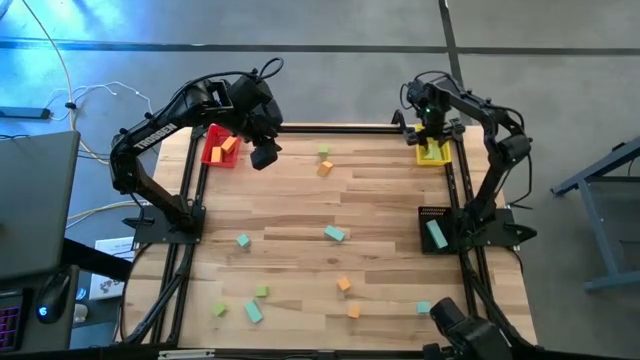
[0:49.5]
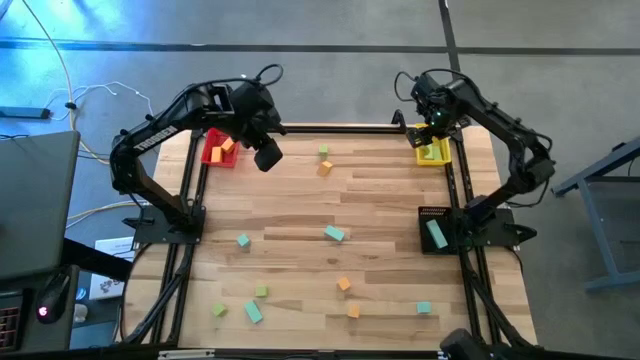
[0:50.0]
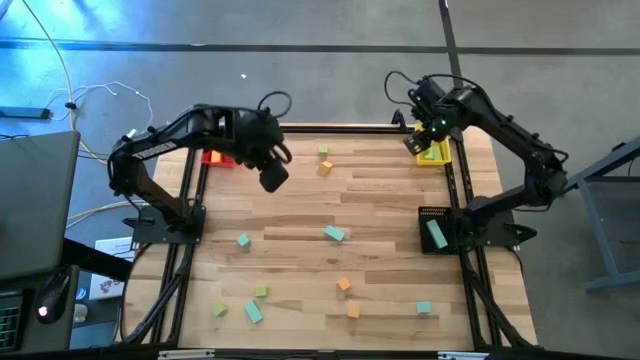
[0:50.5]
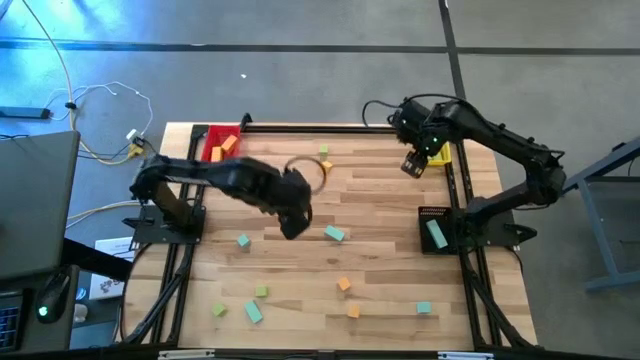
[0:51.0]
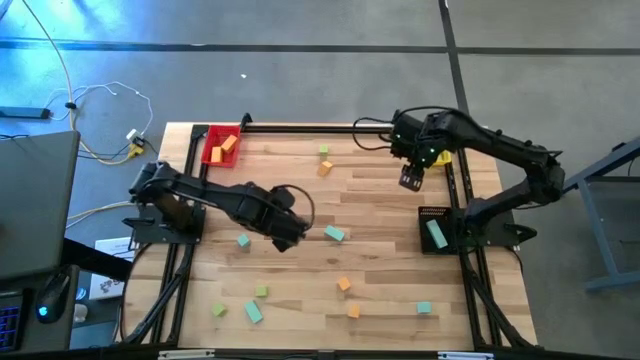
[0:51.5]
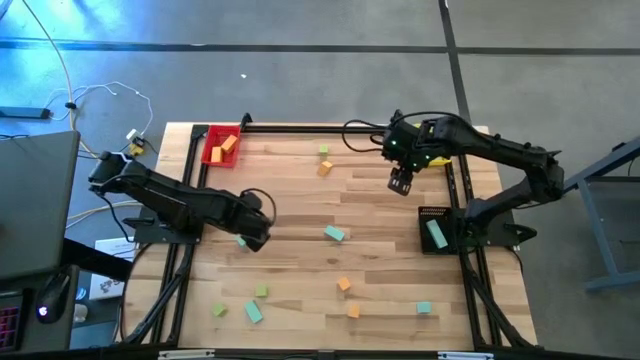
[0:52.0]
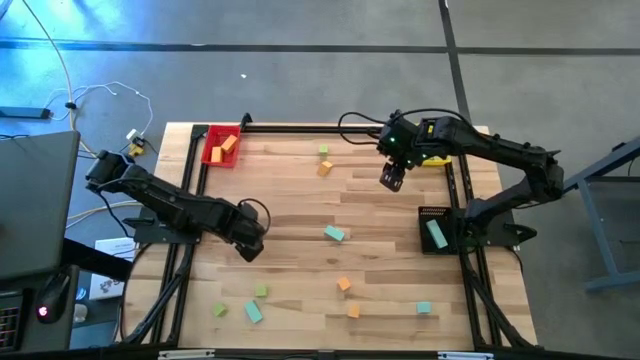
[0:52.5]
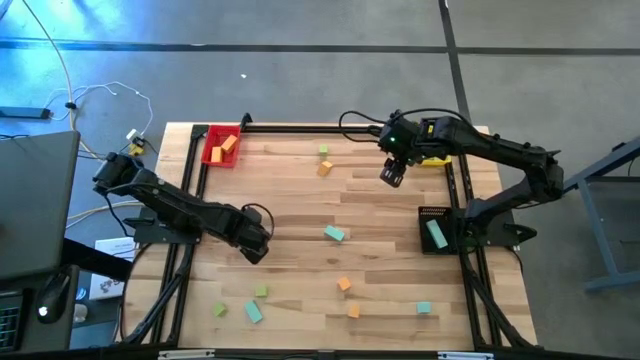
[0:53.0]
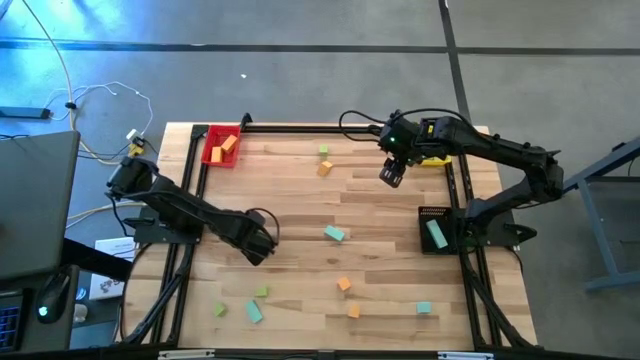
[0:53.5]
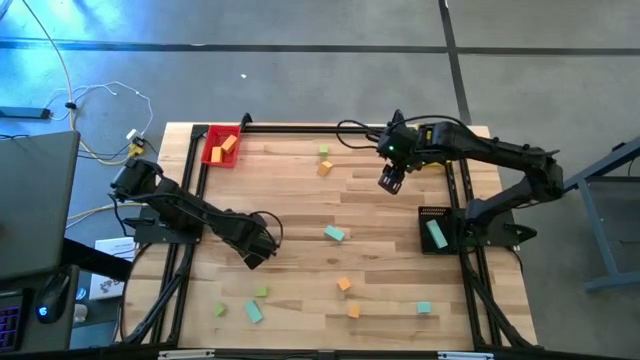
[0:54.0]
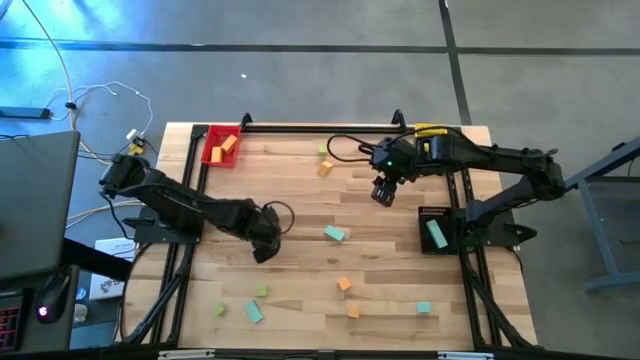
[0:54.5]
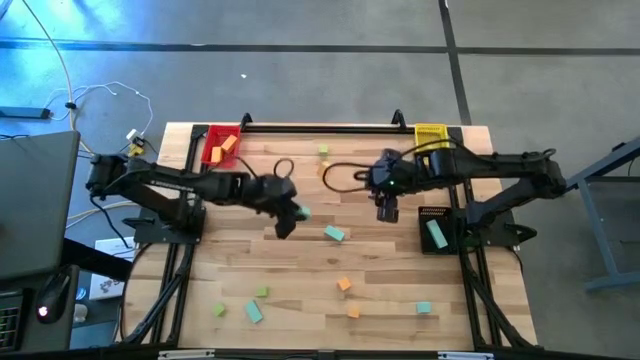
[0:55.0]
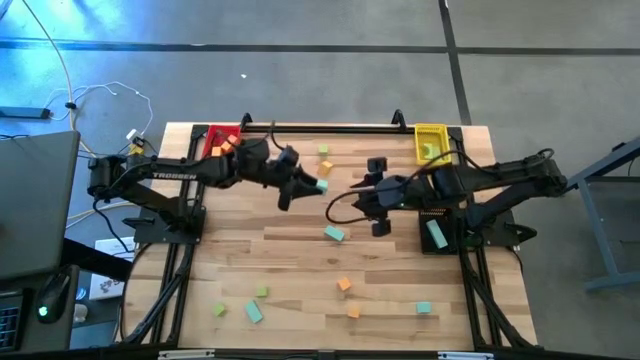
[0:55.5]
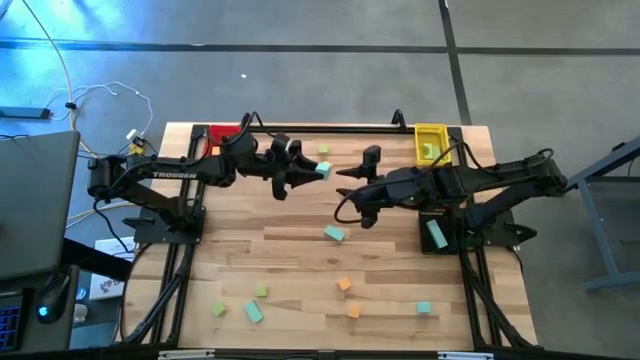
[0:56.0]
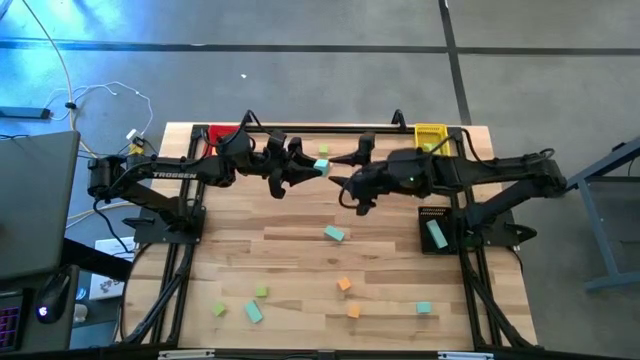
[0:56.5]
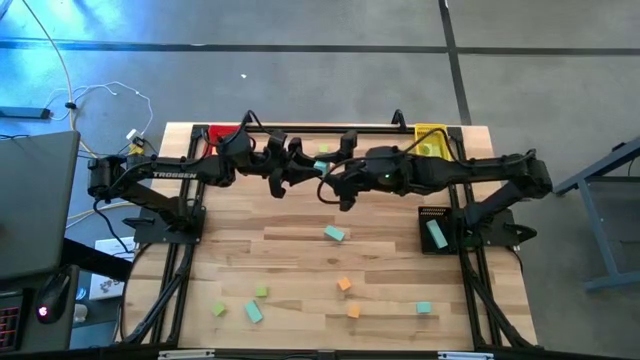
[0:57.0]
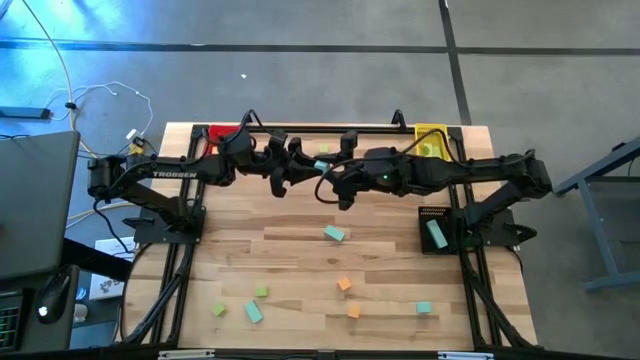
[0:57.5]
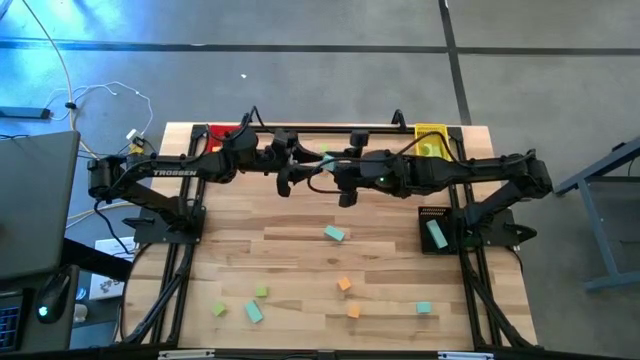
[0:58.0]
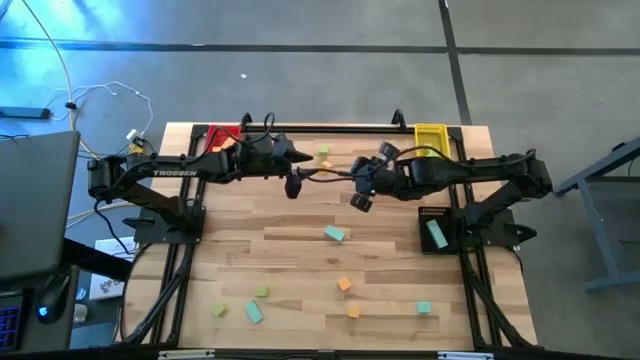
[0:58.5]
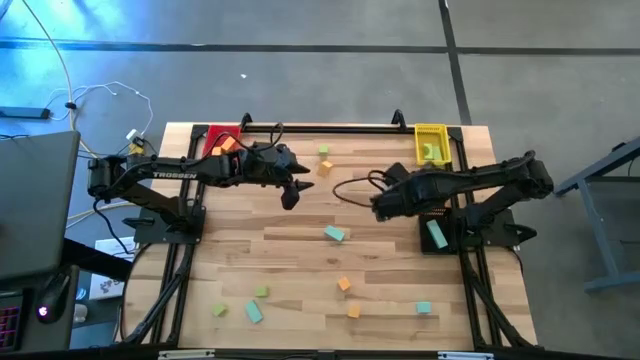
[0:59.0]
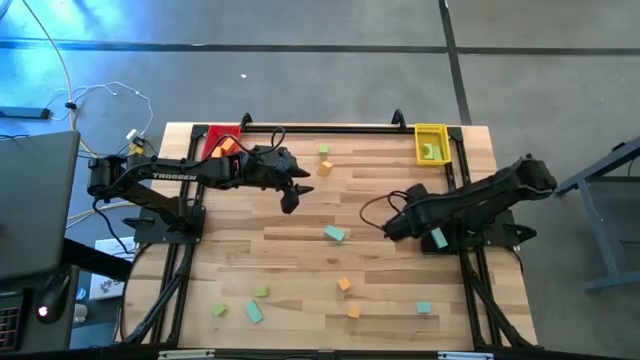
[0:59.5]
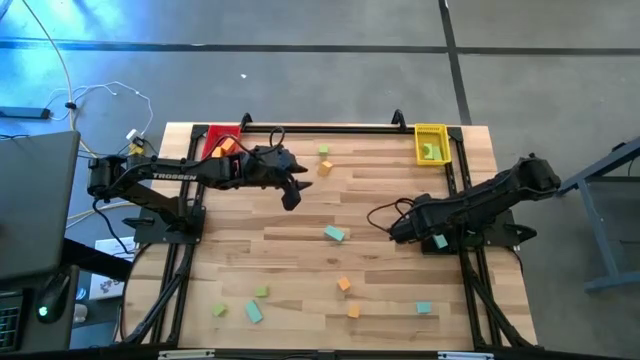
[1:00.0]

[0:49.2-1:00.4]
Task: Sort & place blocks by color
Put the blue block into the black bin

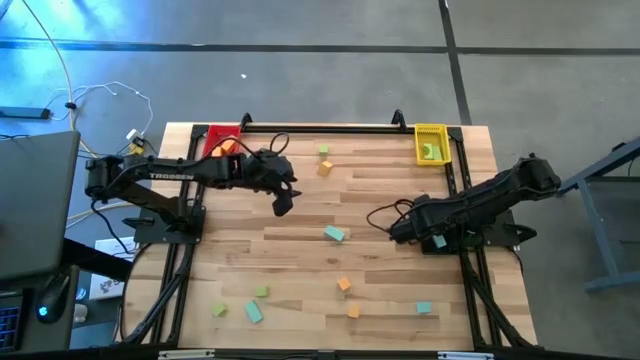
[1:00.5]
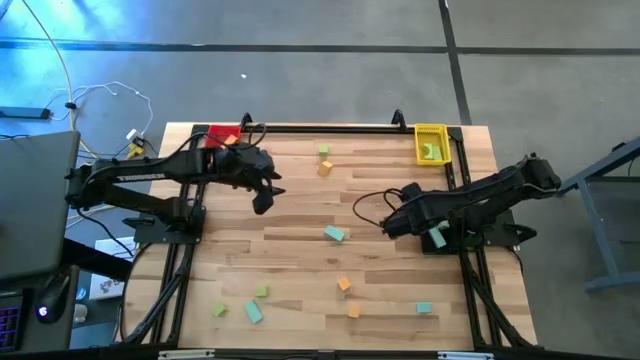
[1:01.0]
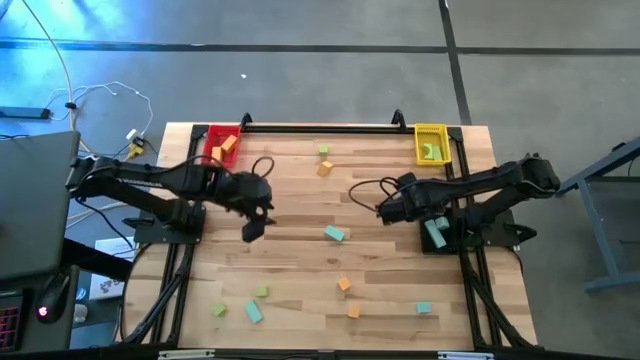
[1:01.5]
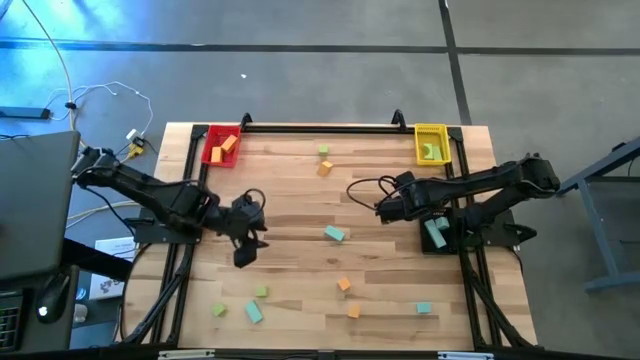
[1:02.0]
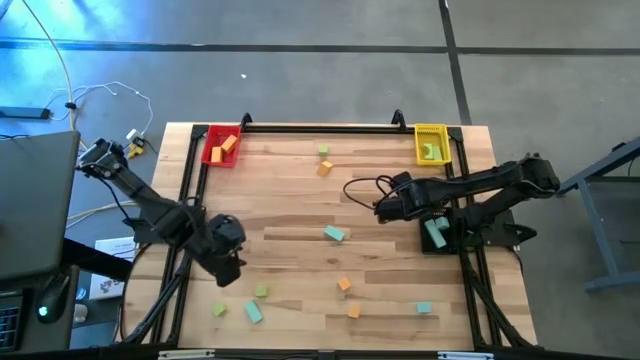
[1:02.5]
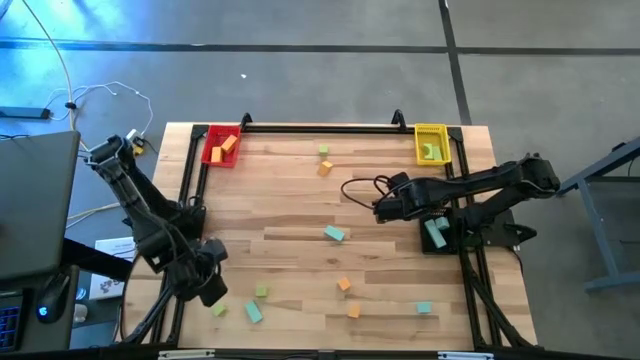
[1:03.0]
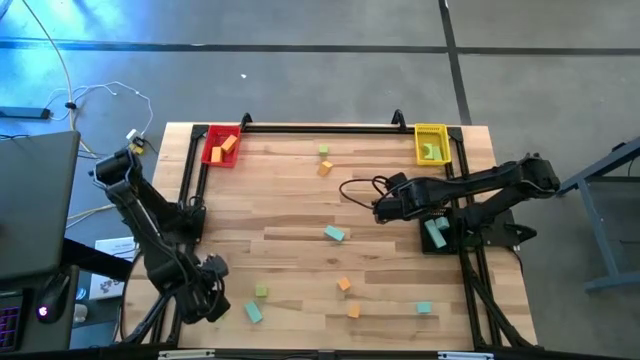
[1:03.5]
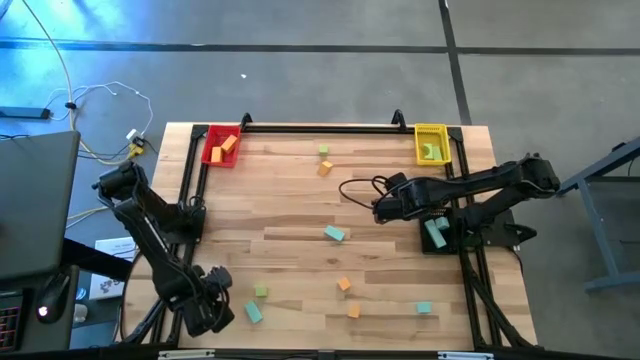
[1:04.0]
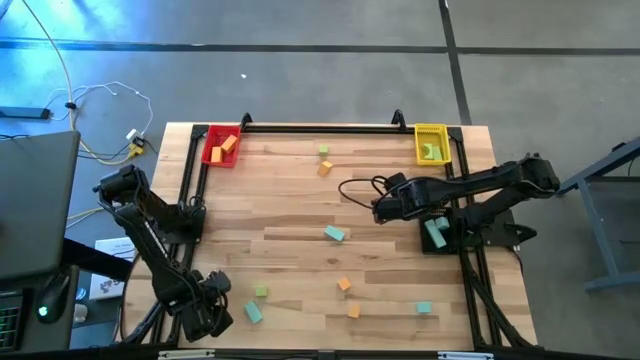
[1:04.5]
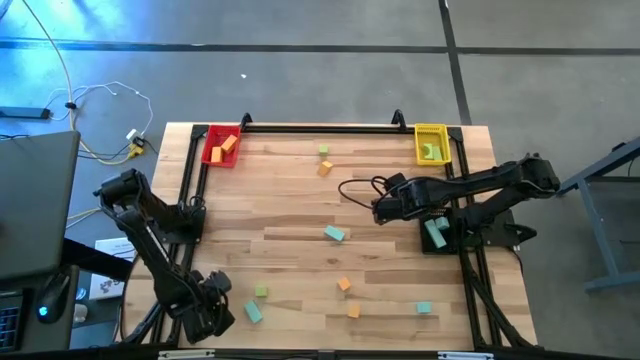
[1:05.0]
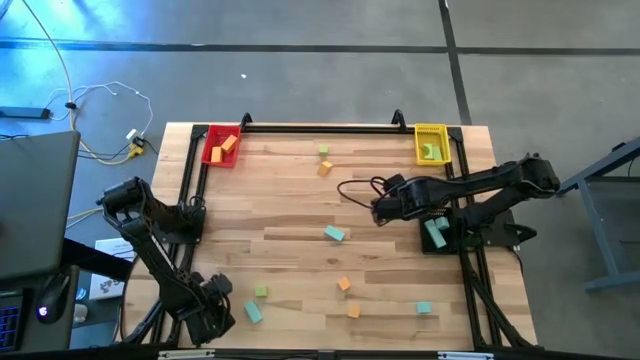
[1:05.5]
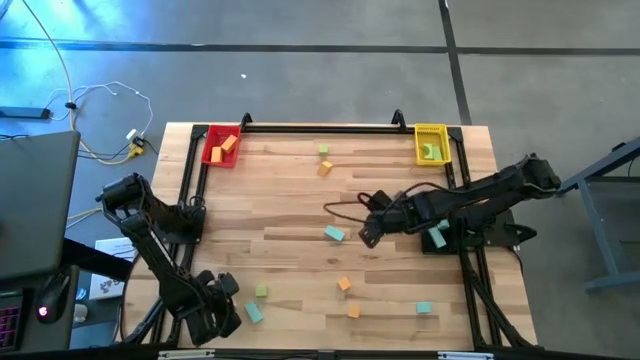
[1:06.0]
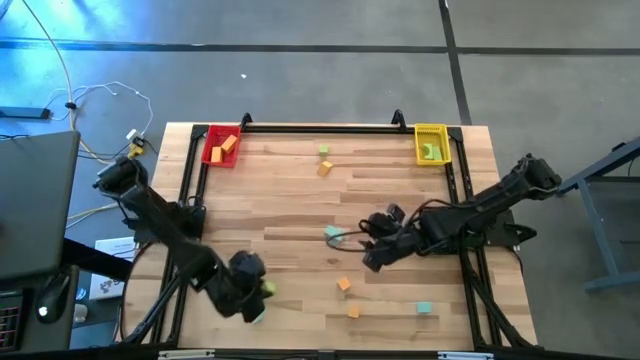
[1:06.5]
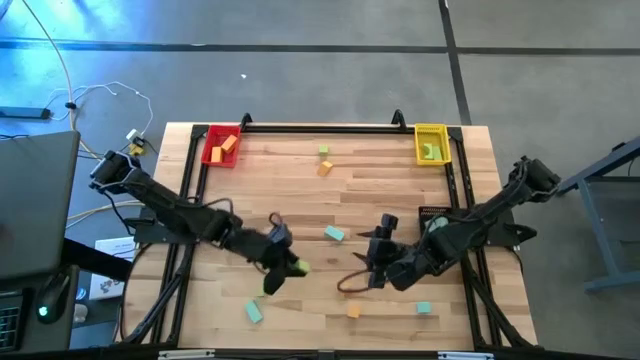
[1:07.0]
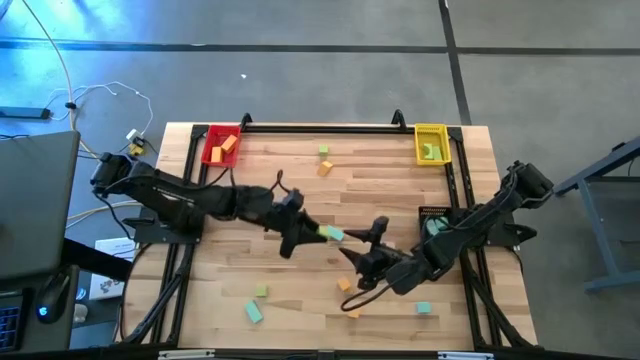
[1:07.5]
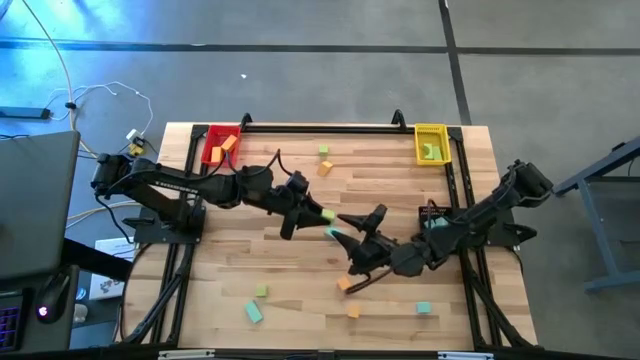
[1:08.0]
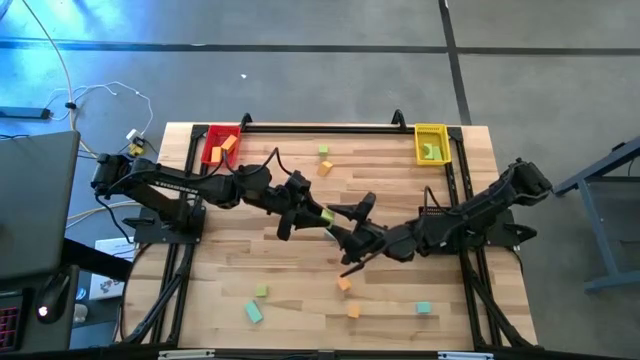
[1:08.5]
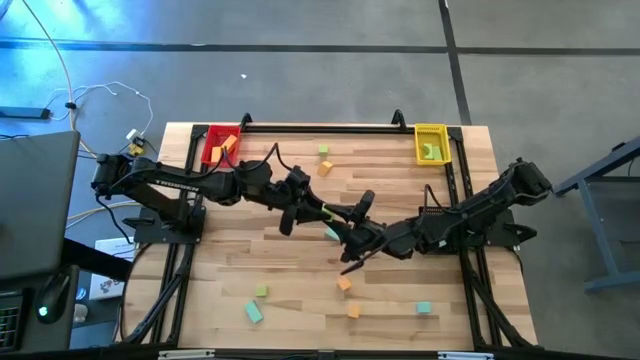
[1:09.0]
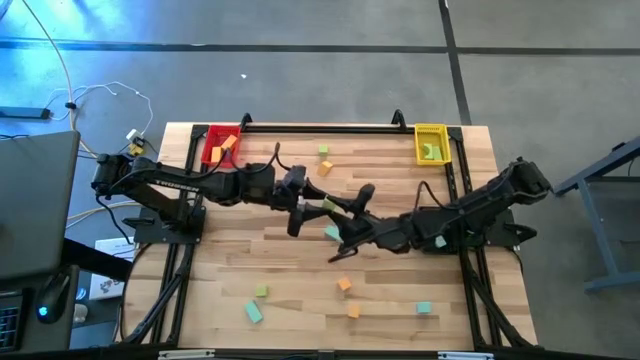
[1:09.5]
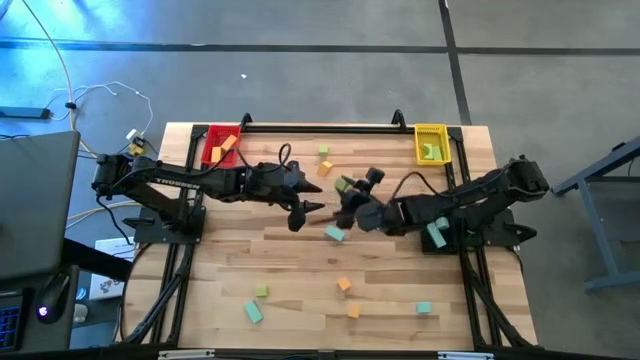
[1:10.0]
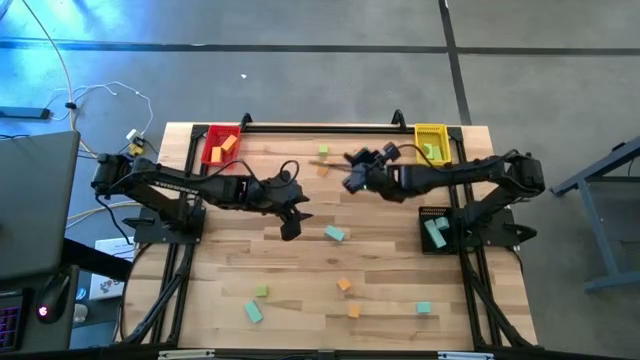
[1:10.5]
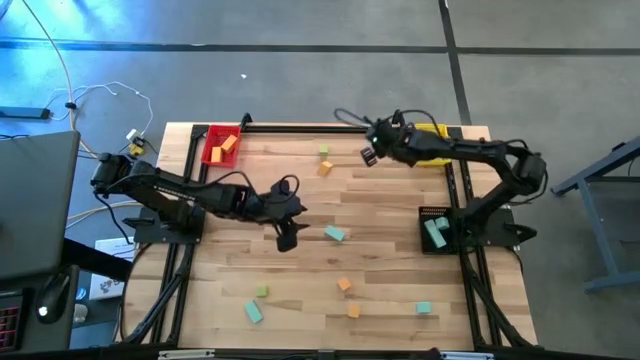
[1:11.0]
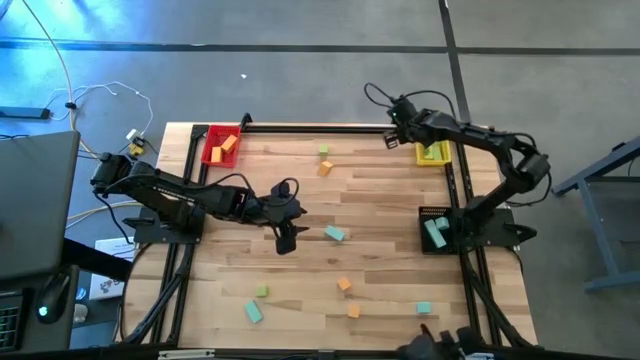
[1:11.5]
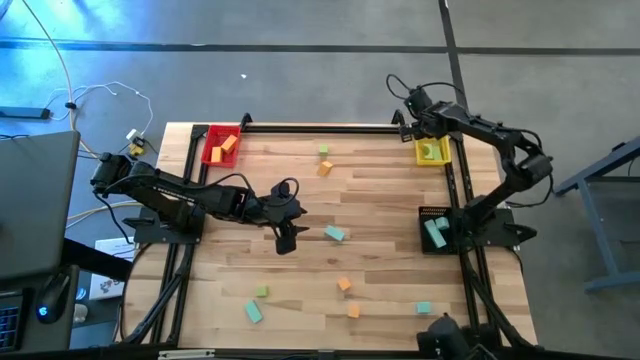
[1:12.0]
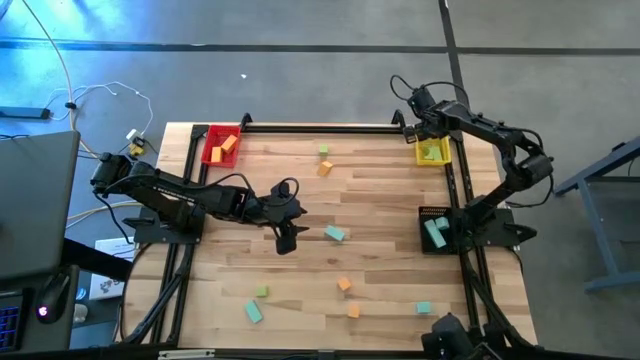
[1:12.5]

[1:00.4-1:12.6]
Put the green block into the yellow bin
